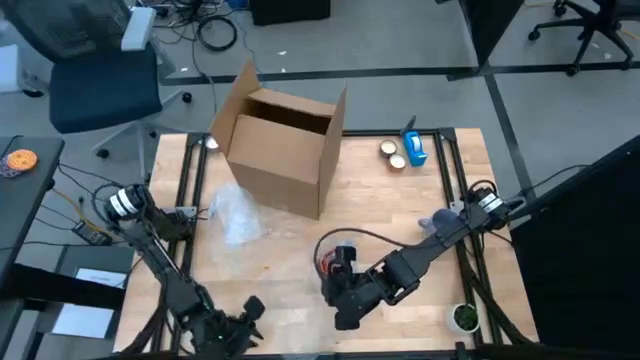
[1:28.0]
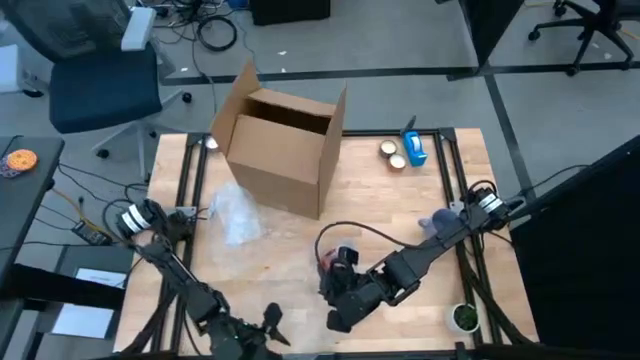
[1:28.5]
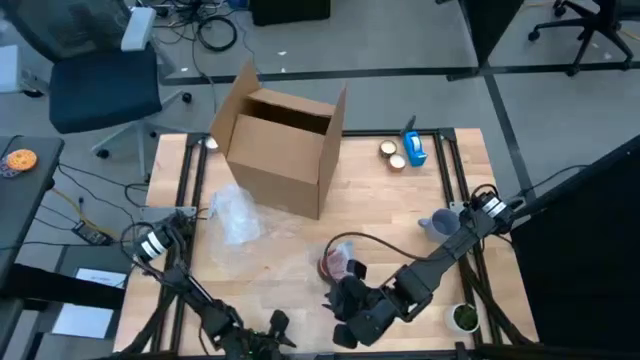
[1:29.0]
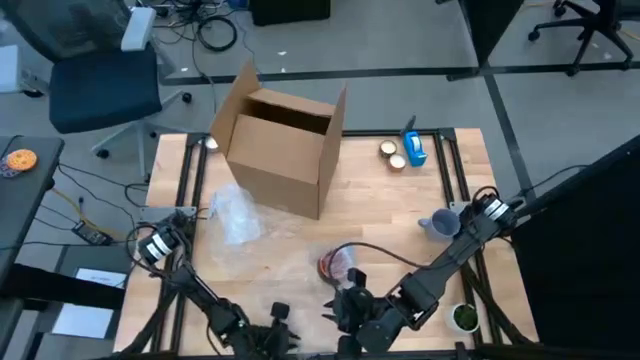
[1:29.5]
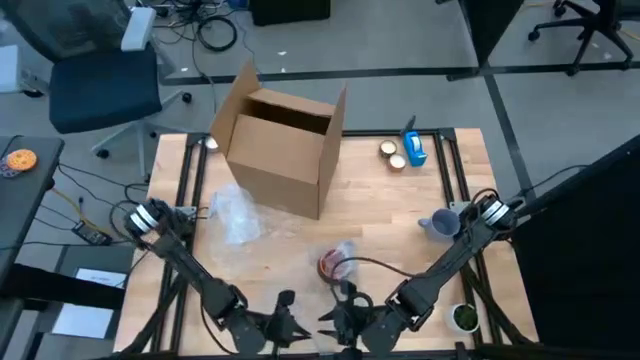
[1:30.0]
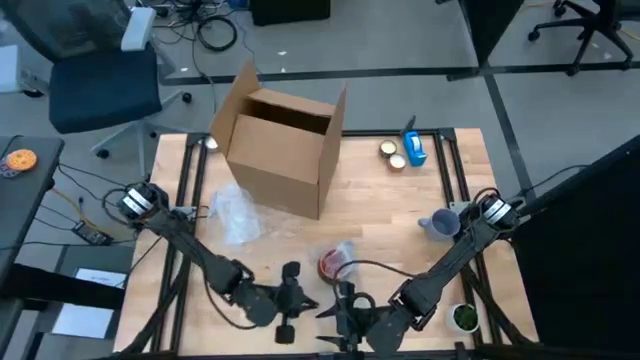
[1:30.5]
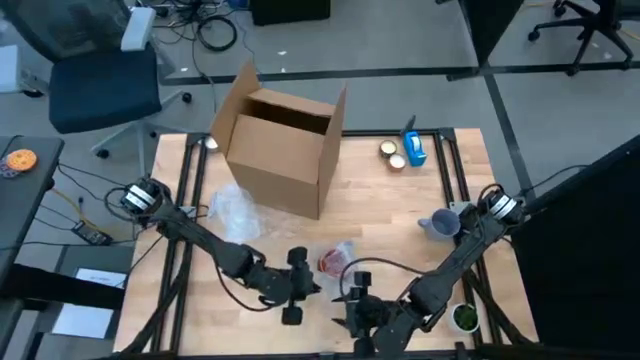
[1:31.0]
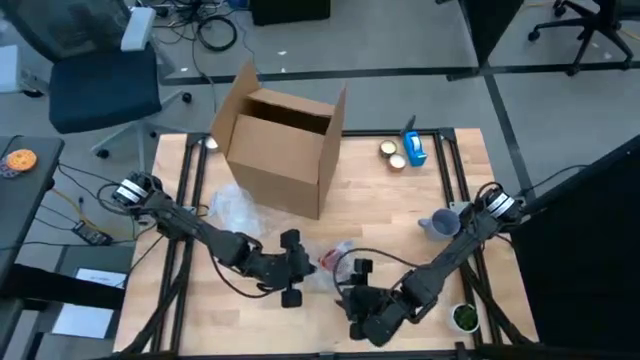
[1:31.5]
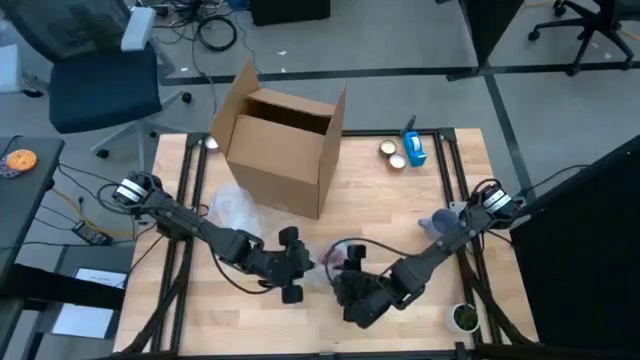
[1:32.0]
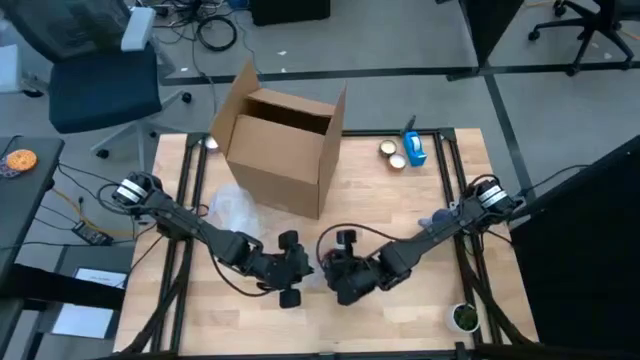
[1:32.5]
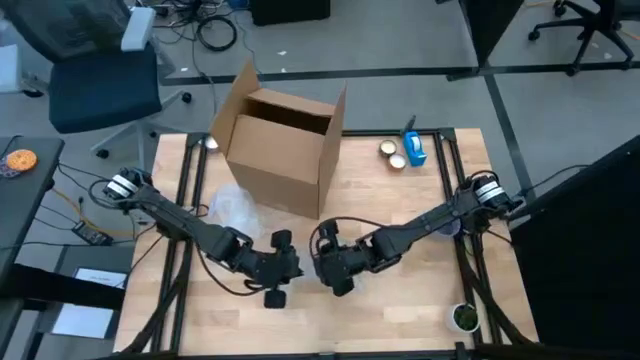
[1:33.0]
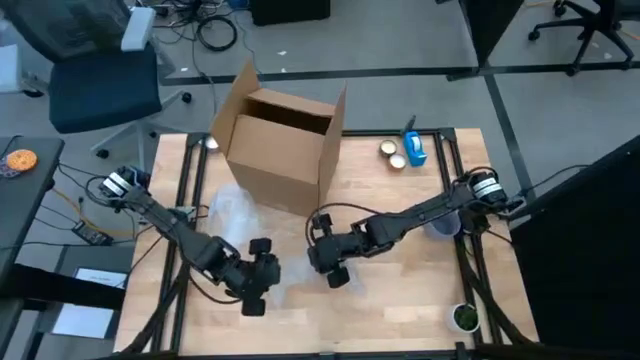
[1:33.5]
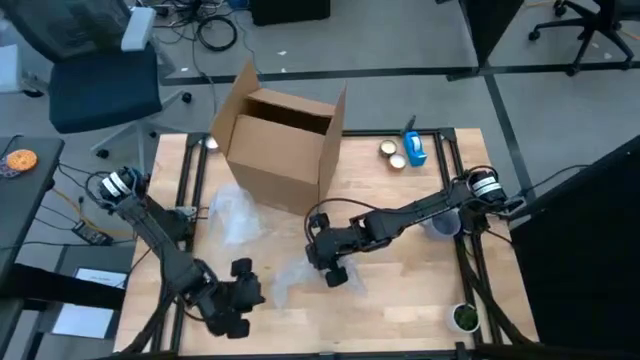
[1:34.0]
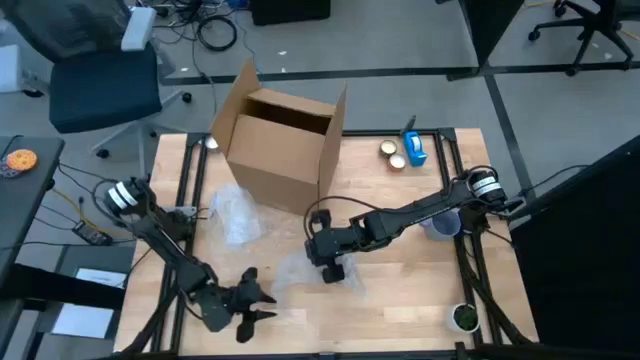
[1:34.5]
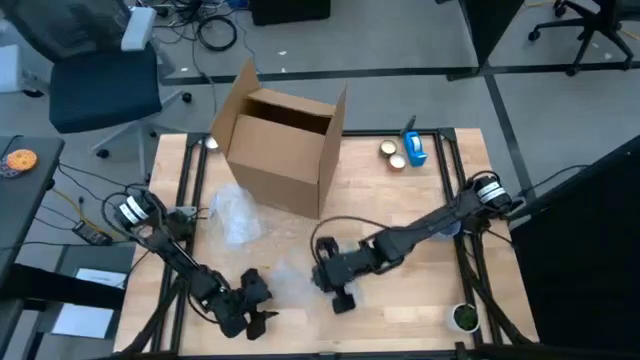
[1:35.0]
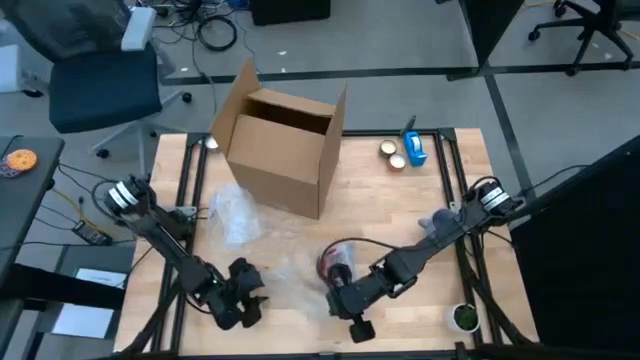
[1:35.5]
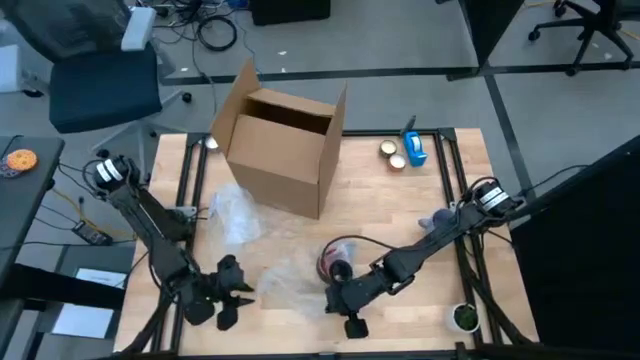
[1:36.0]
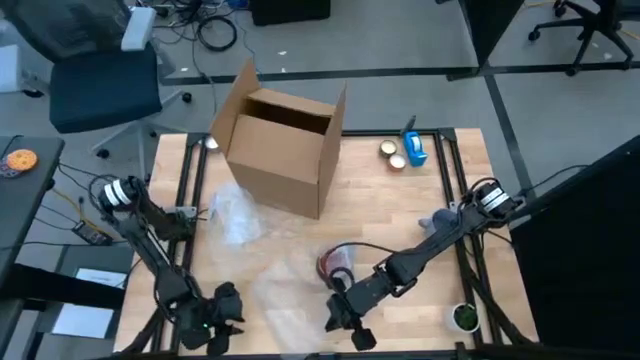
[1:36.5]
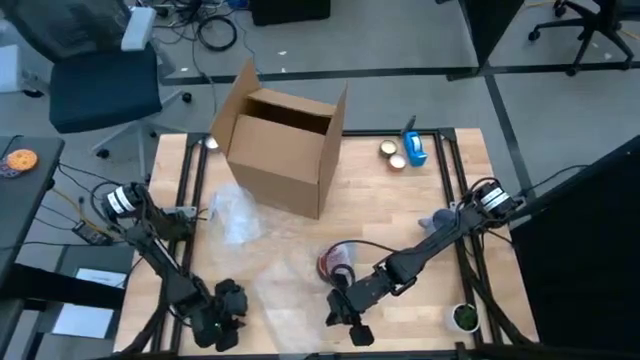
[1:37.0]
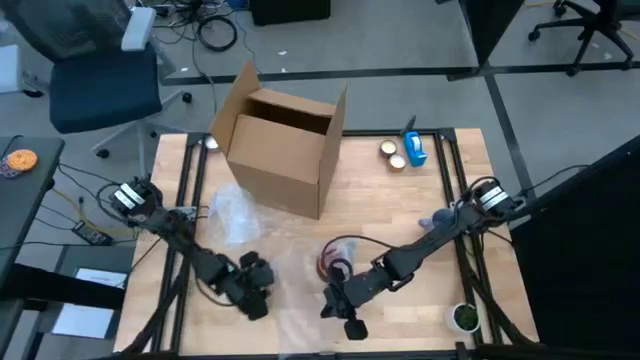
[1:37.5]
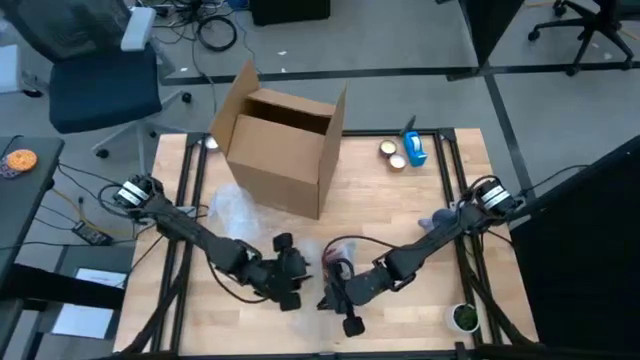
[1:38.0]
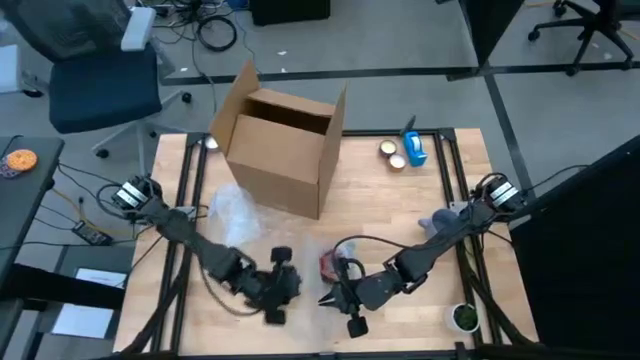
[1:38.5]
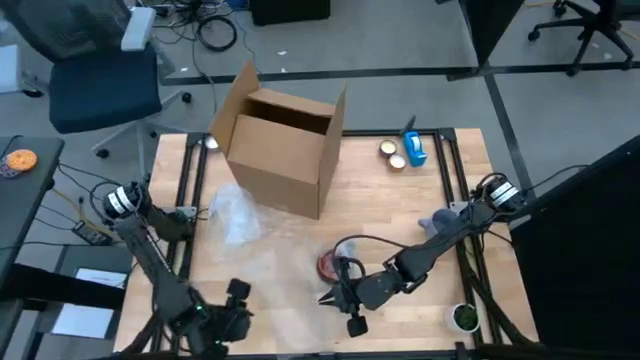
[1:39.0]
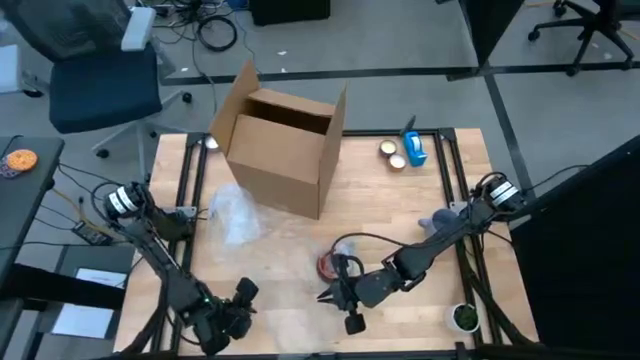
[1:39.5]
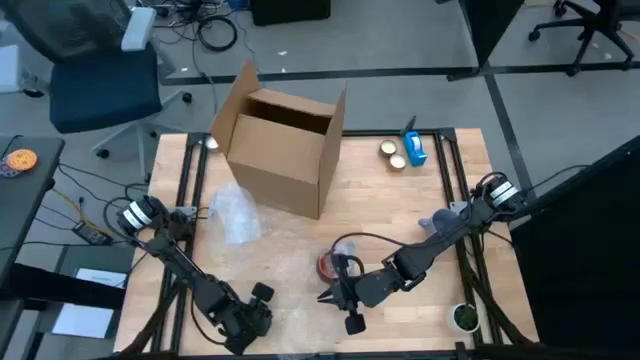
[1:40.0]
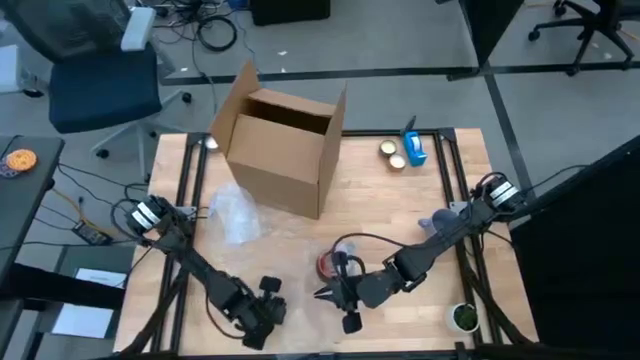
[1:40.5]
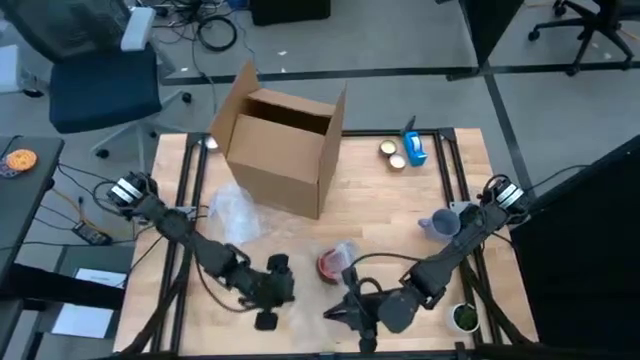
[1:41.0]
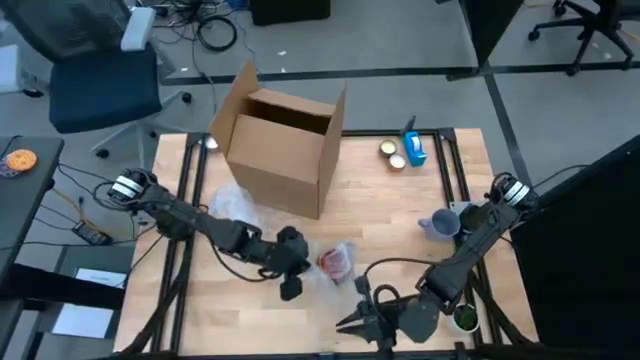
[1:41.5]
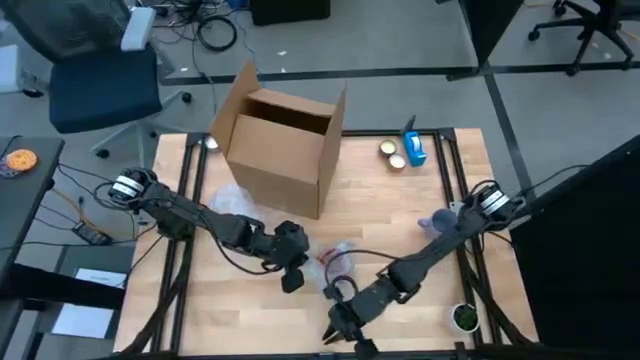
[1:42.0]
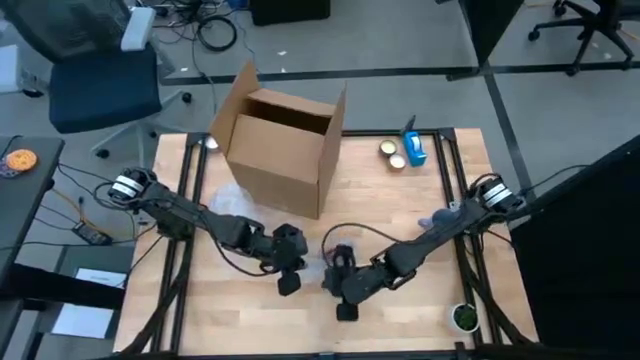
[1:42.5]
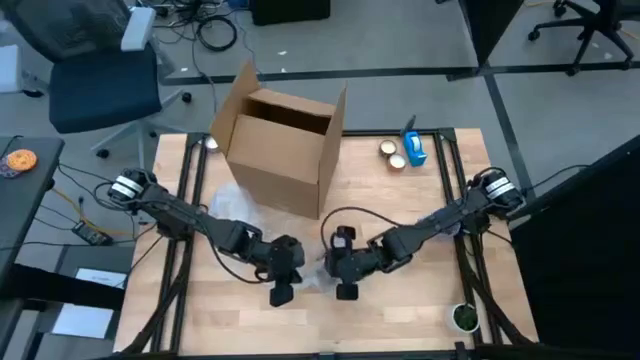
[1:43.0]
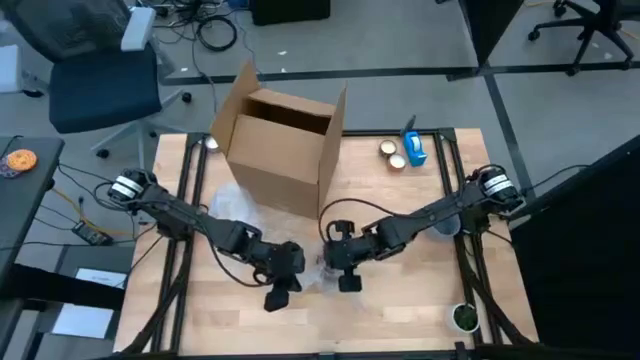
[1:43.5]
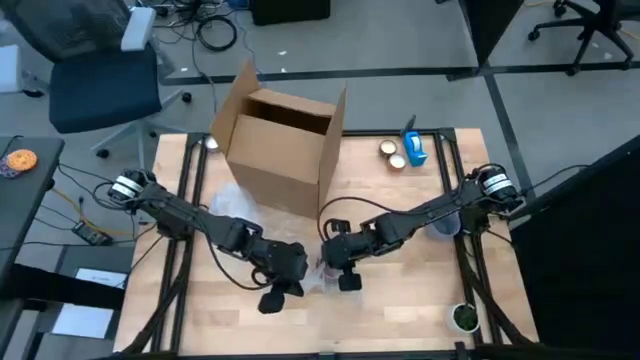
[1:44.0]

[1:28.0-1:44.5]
Task: wrap mug
Wrap the orange mug with bubble wrap

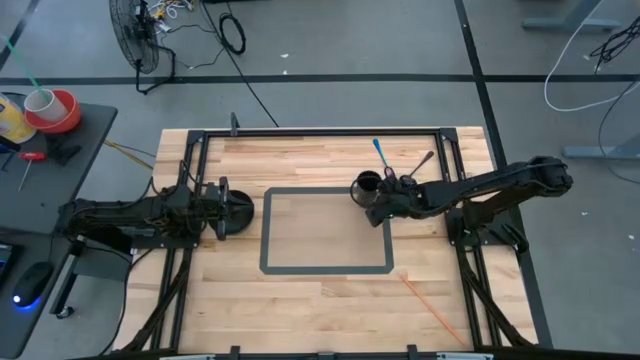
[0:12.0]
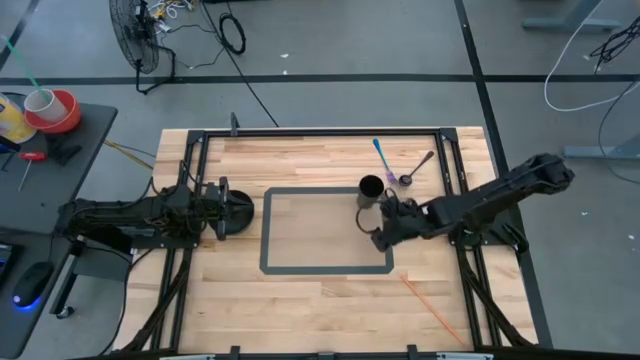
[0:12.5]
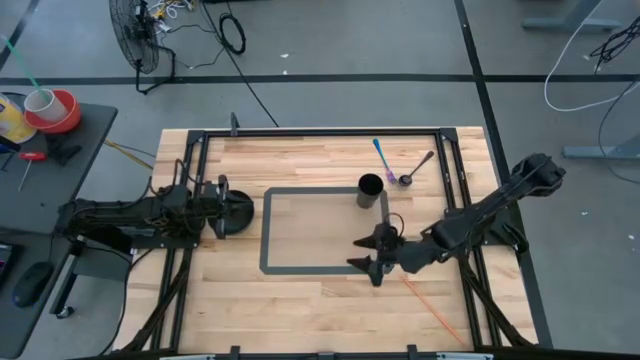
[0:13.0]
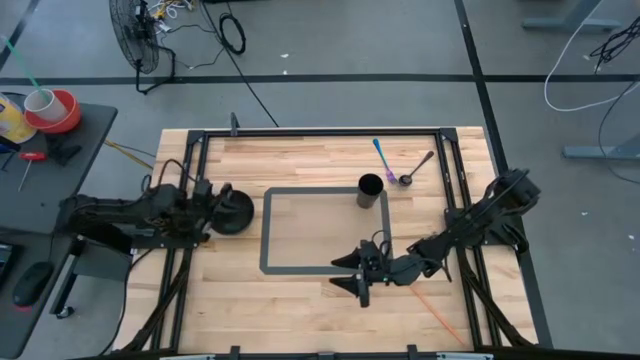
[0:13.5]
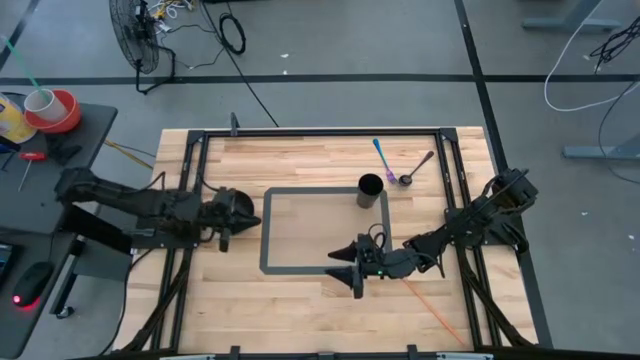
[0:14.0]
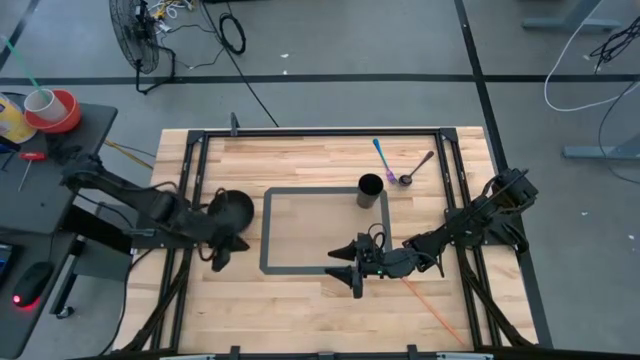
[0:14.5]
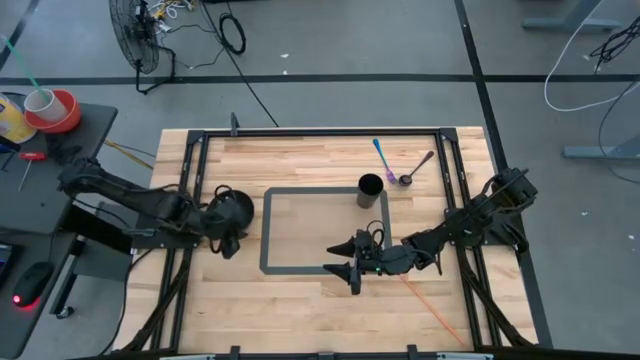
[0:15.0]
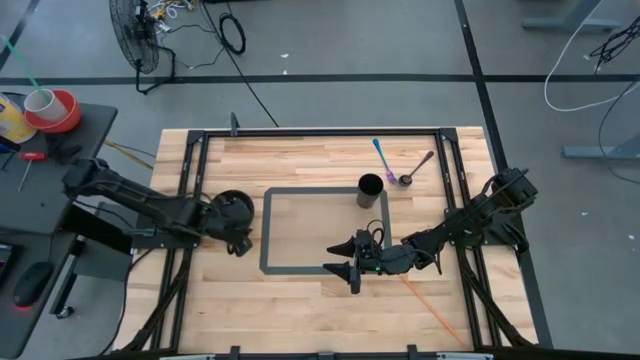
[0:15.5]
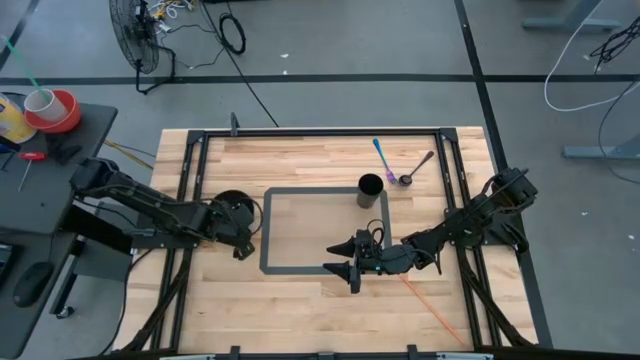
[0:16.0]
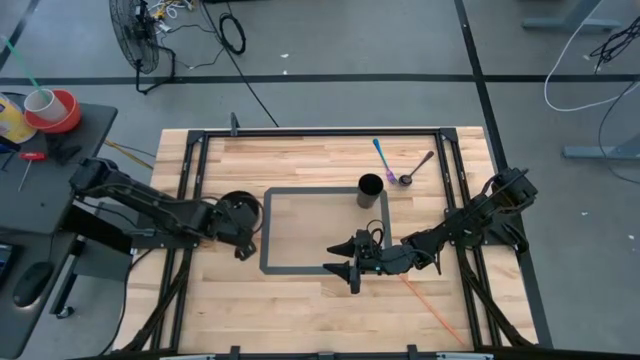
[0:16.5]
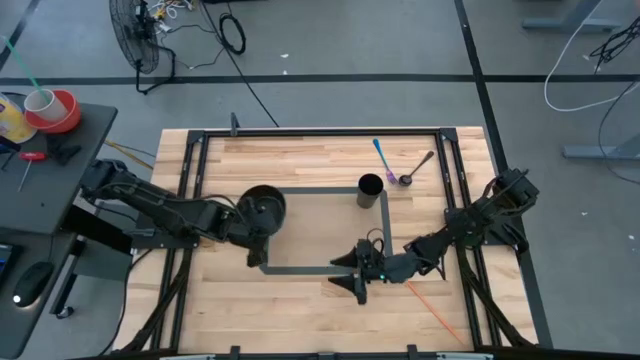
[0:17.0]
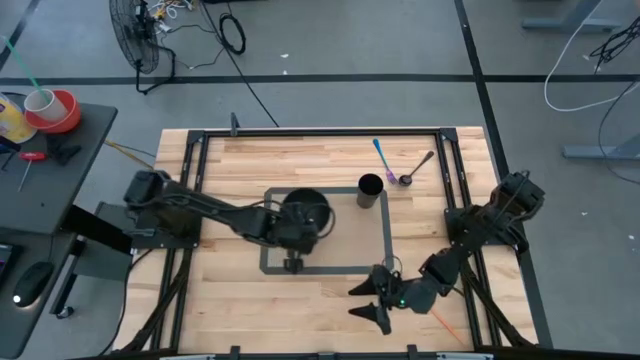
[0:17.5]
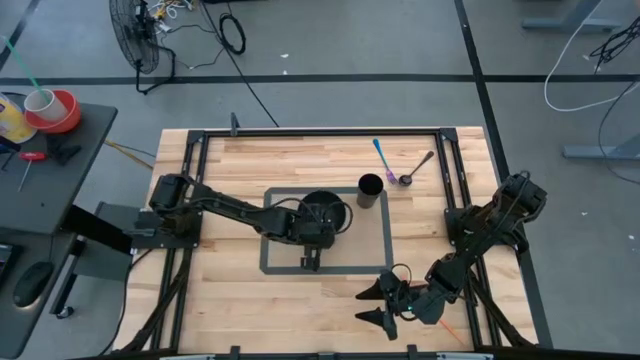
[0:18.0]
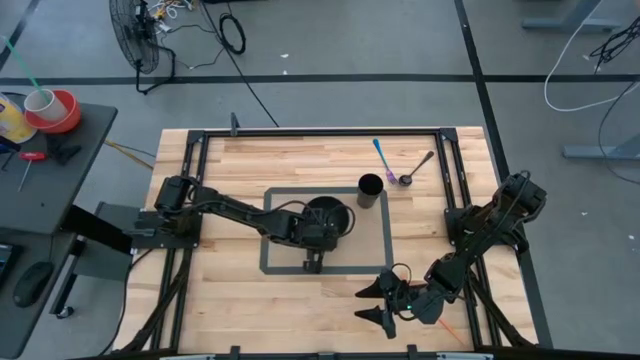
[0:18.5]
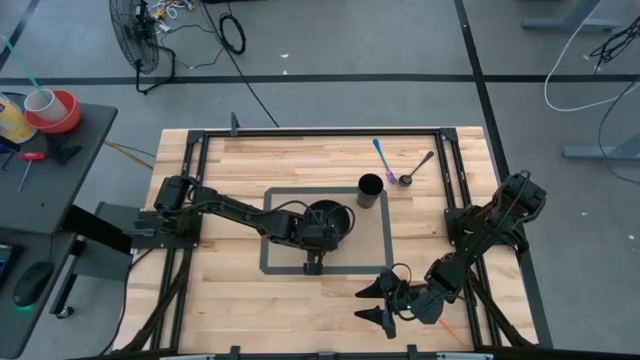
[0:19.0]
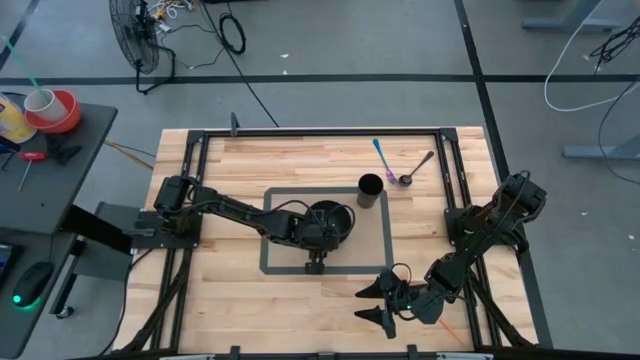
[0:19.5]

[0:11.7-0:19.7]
Task: Pick & Place Utensil
Put the black bowl to the bottom left of the black cup on the transparent mat
